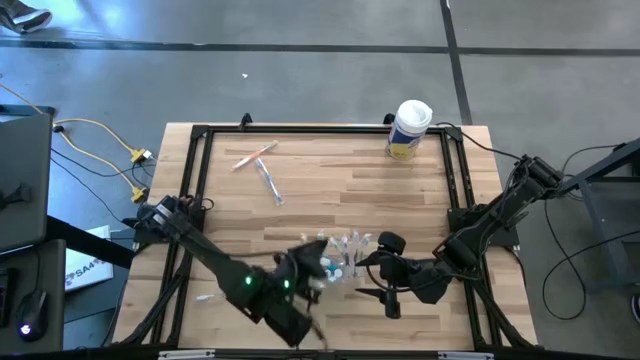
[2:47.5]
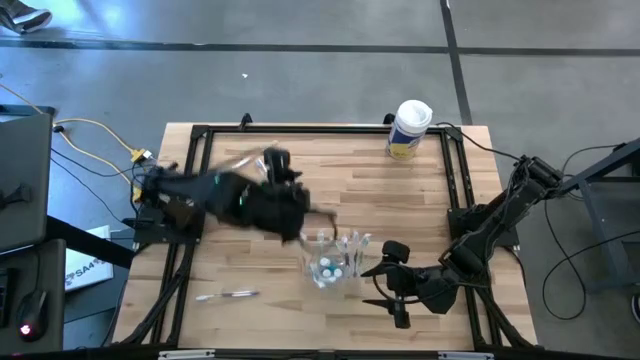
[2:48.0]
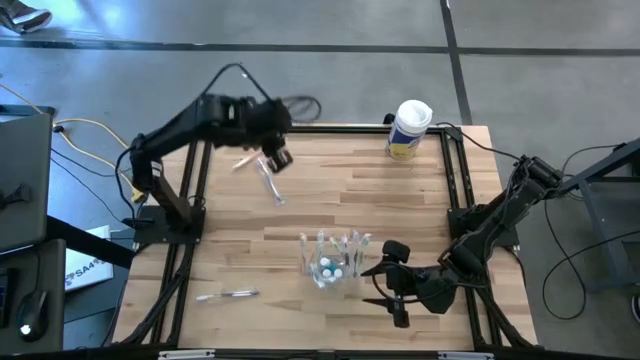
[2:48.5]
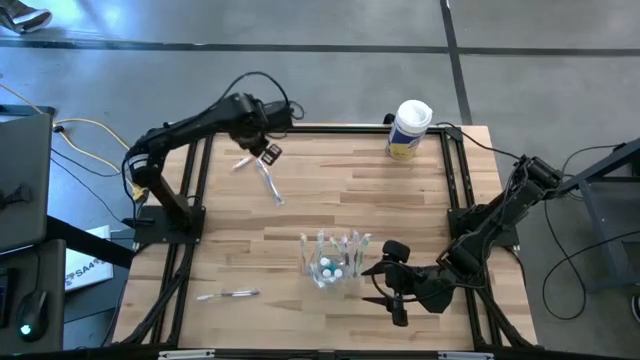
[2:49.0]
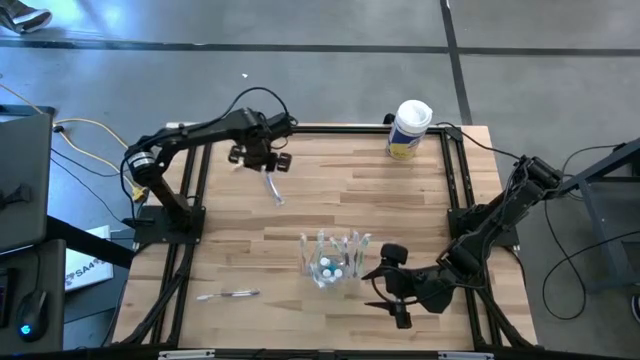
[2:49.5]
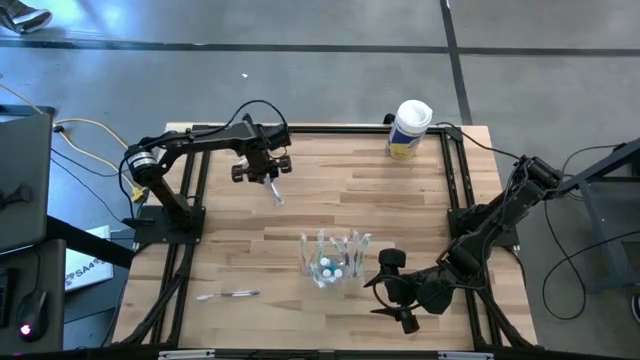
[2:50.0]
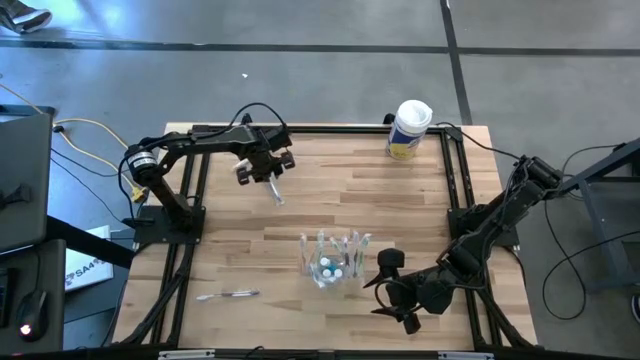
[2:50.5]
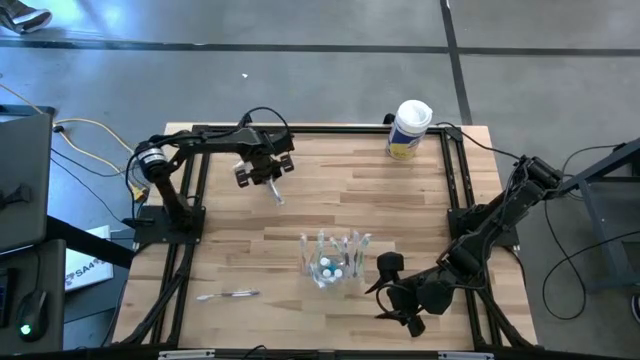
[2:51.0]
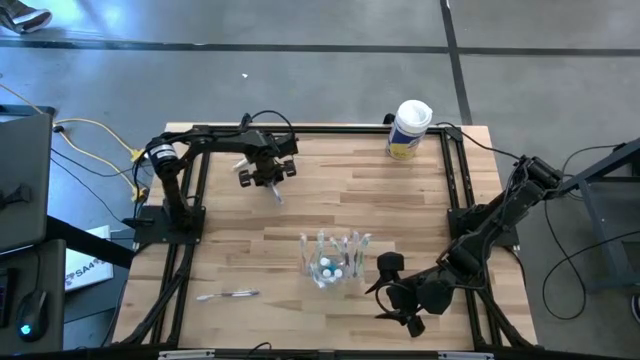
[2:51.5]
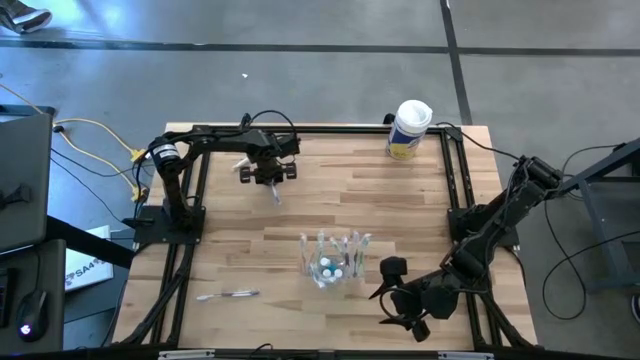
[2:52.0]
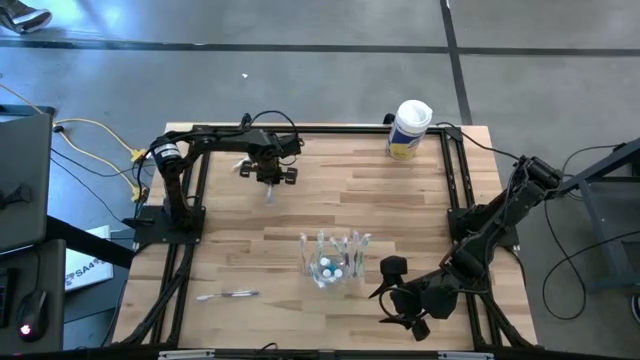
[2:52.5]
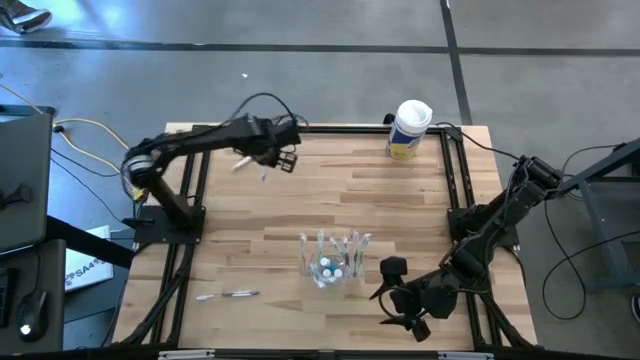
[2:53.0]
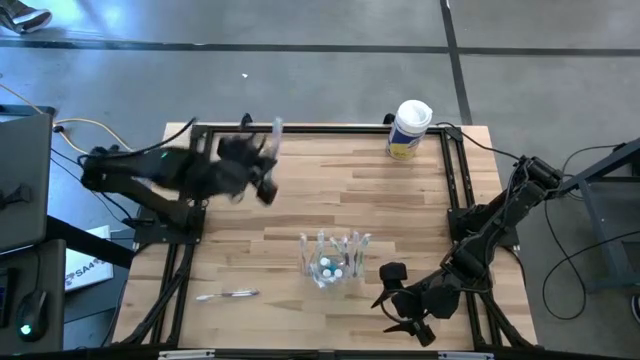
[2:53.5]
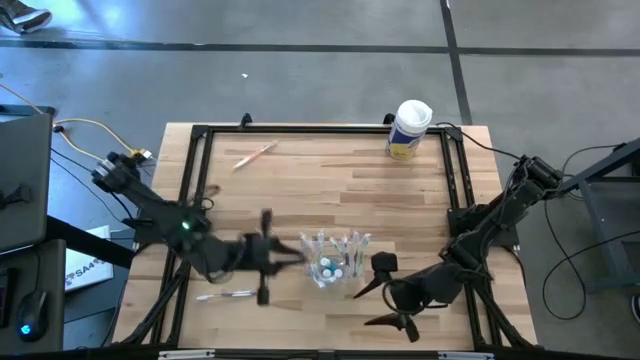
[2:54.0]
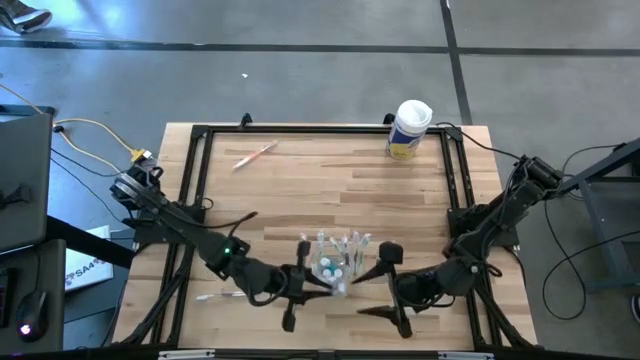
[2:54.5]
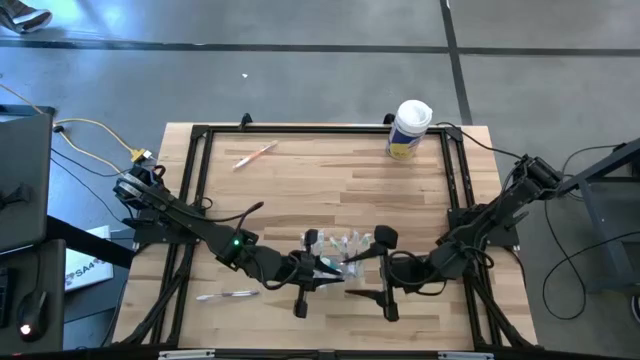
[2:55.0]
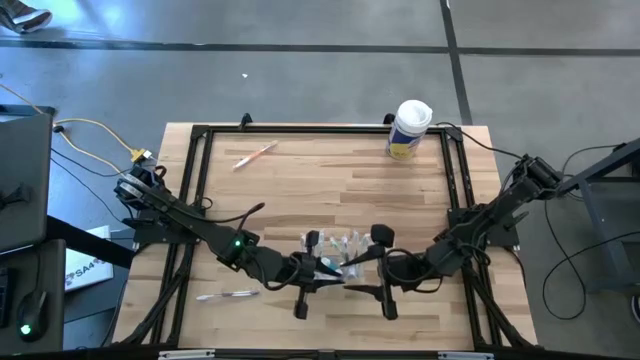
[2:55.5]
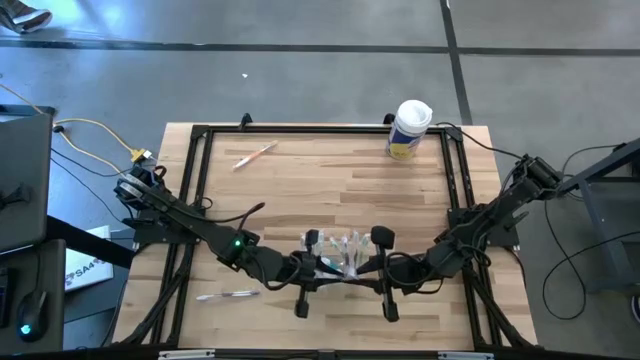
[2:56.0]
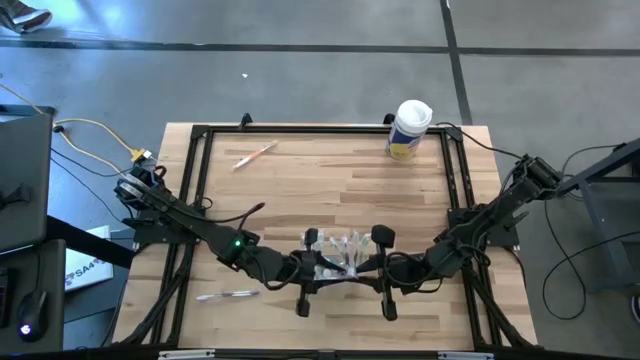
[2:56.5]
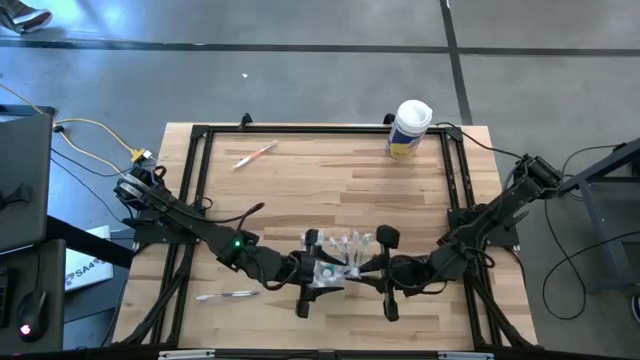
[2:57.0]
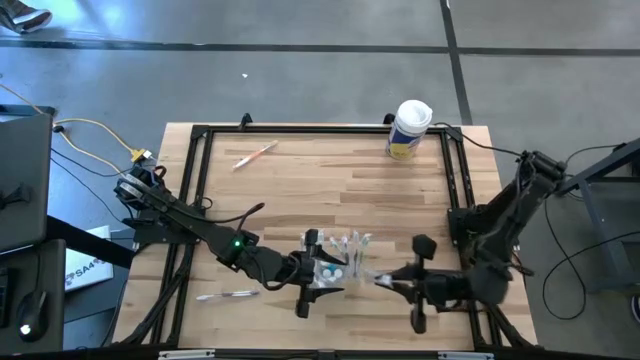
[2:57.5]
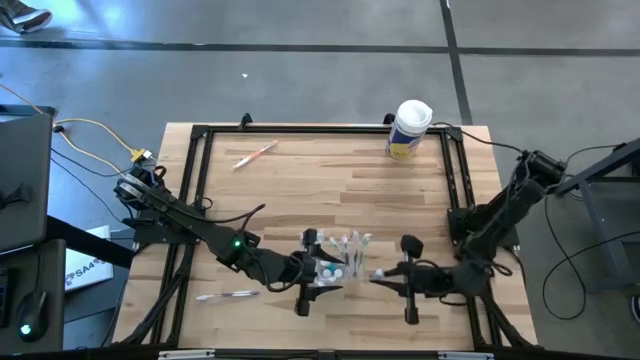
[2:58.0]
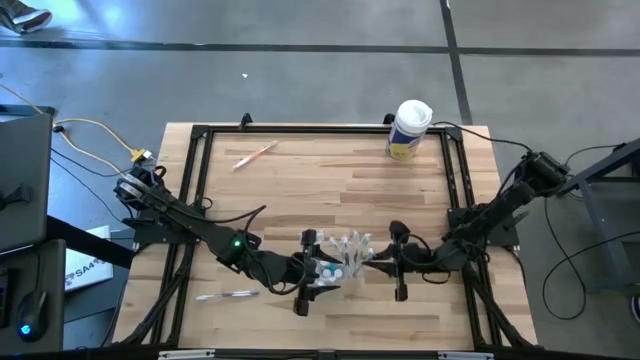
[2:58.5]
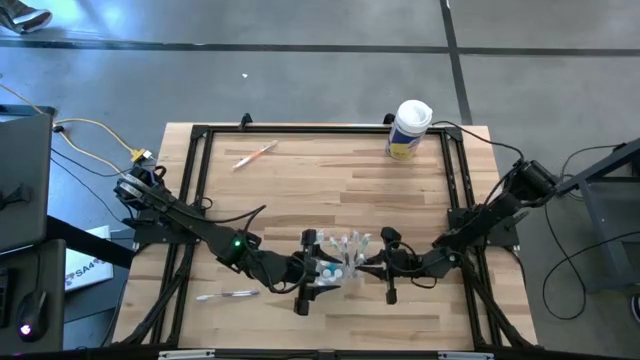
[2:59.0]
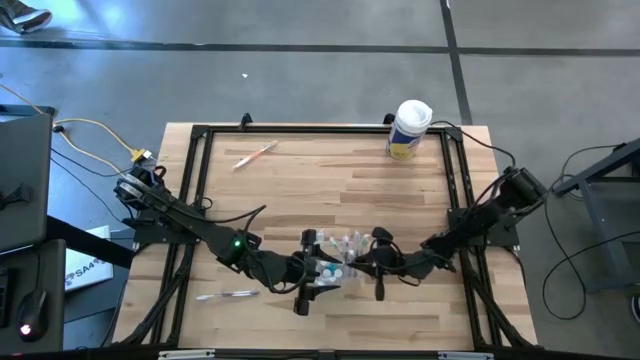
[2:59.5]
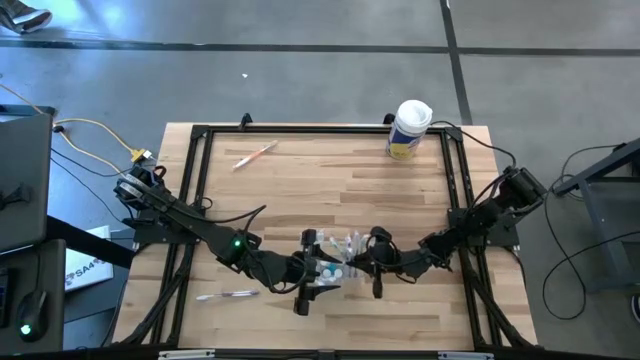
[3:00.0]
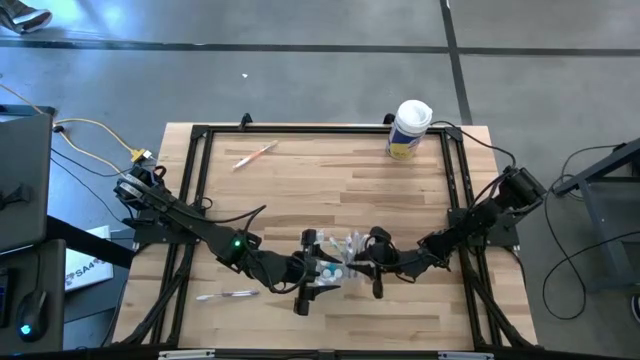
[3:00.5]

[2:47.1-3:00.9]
Task: Pick & Place toothbrushing station
Put the blue toothbrush into the transparent organizer

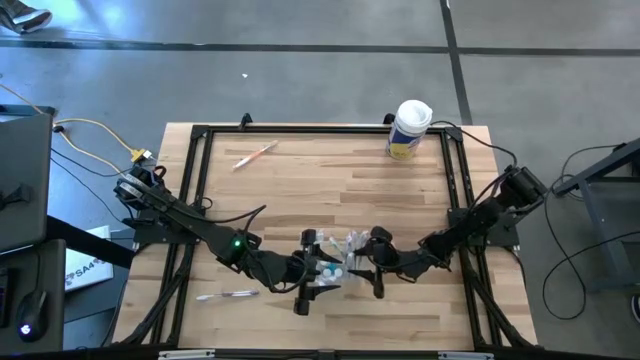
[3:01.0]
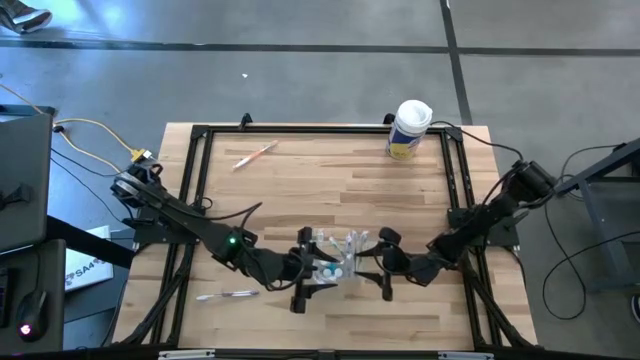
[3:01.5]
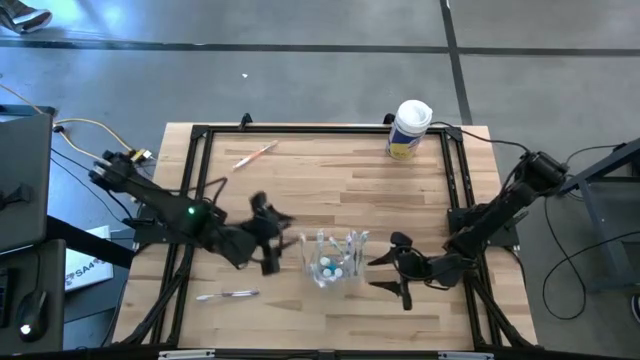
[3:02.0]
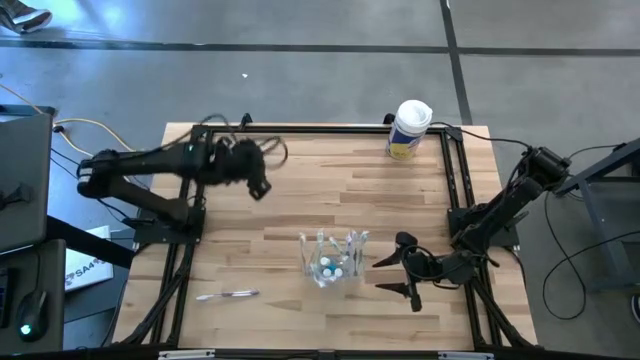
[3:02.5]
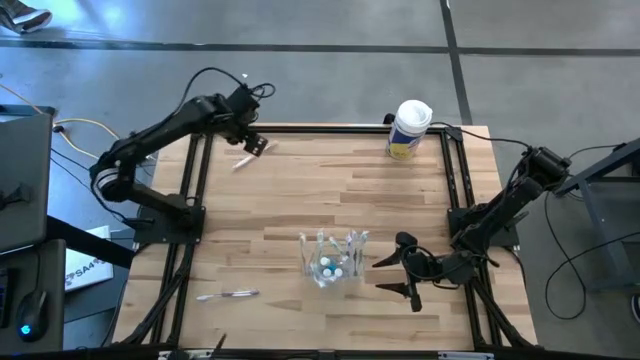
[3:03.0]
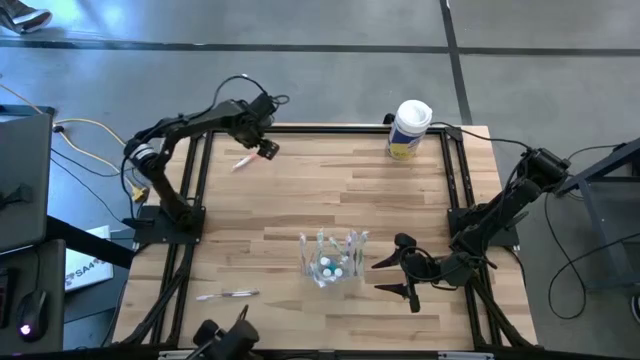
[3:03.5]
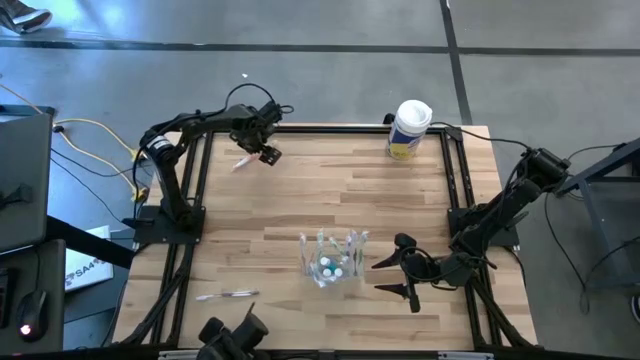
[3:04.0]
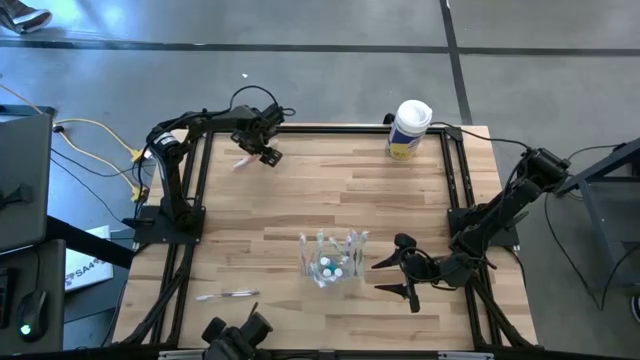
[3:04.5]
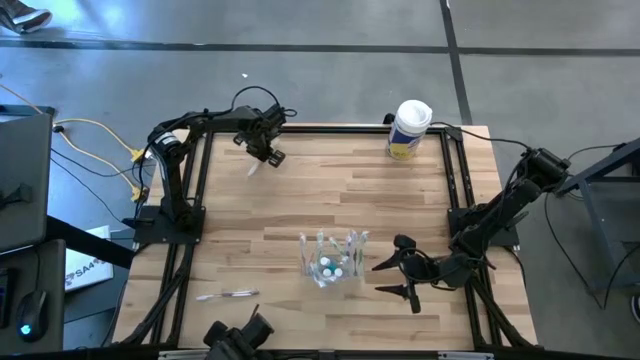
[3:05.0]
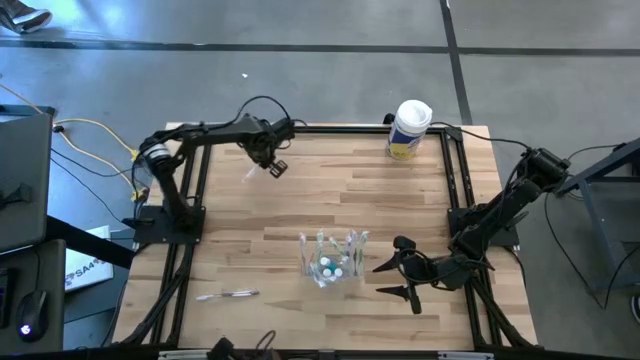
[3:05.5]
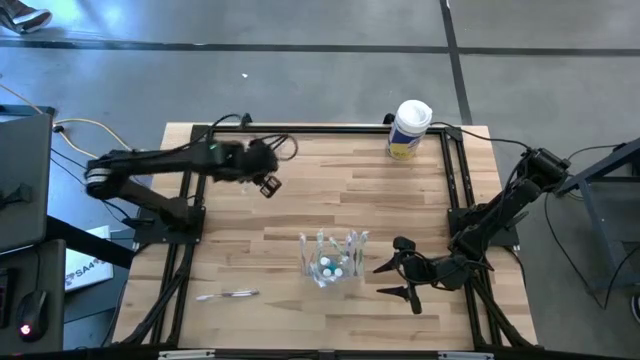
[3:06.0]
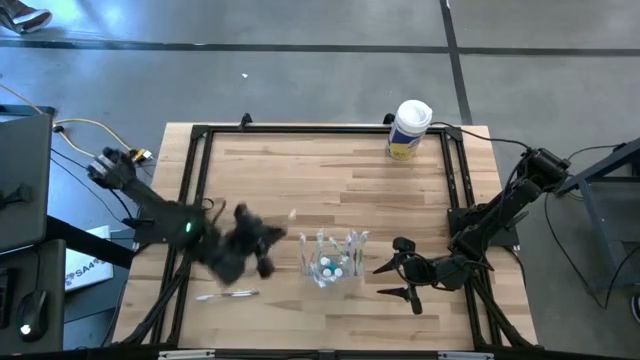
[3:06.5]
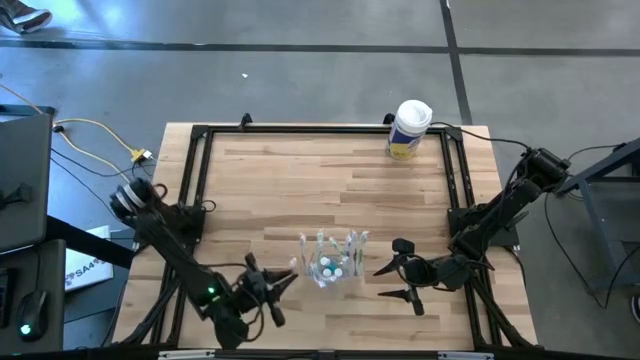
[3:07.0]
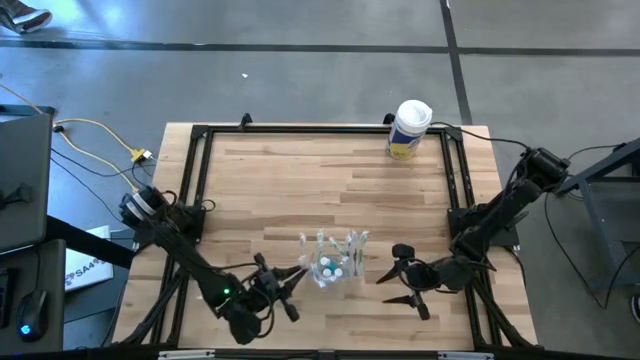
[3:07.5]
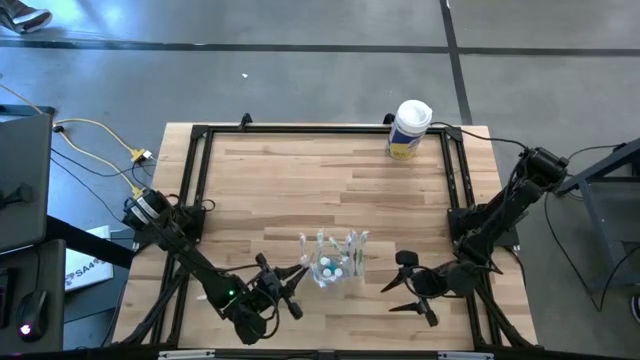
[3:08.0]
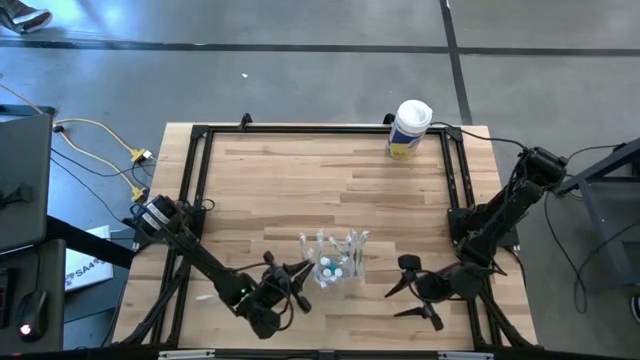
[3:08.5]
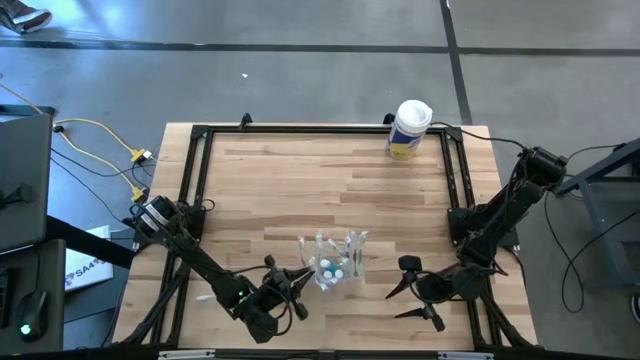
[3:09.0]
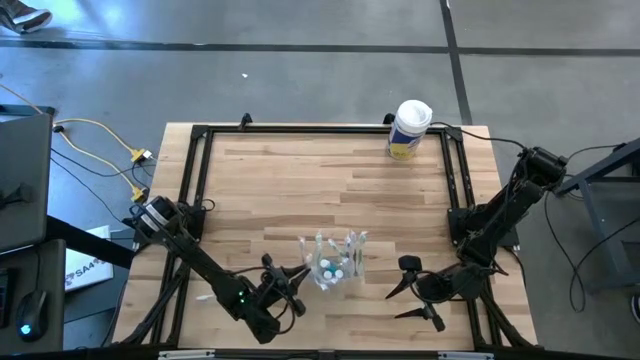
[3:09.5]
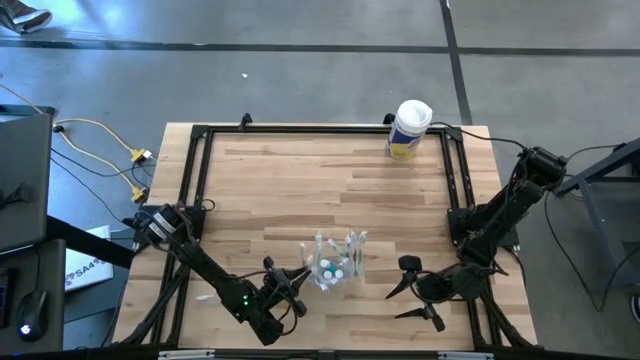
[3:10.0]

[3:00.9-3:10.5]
Put the orange toothbrush into the transparent organizer
